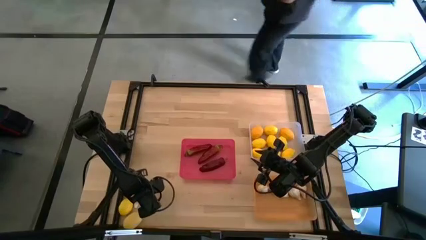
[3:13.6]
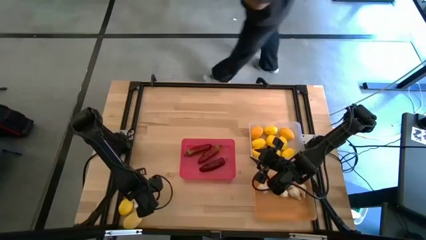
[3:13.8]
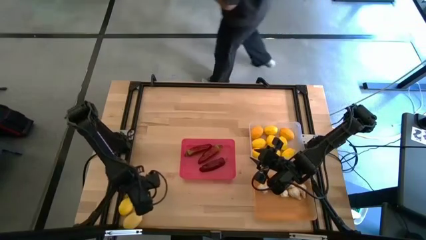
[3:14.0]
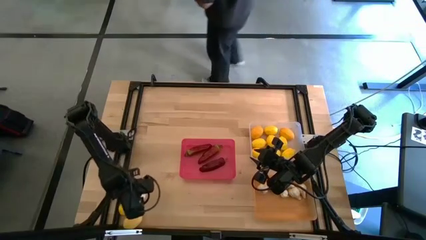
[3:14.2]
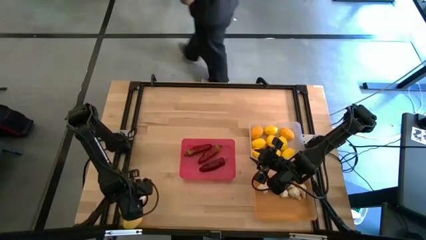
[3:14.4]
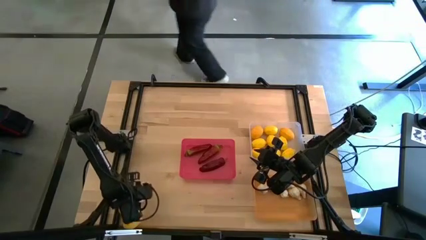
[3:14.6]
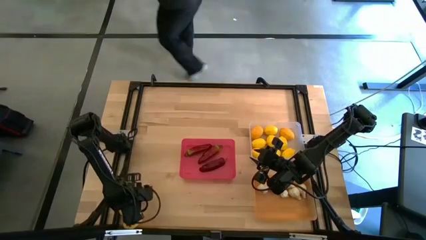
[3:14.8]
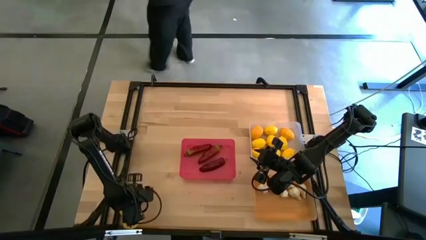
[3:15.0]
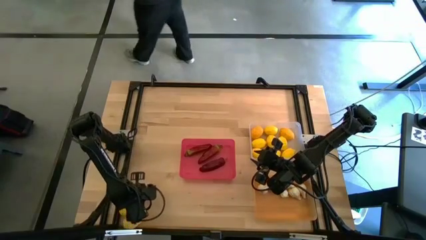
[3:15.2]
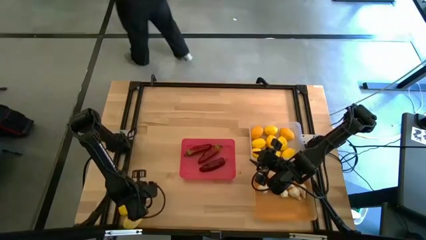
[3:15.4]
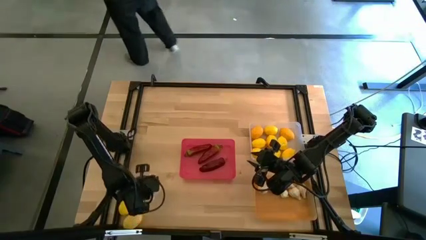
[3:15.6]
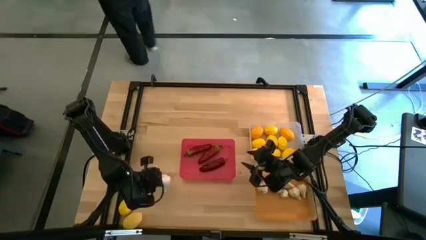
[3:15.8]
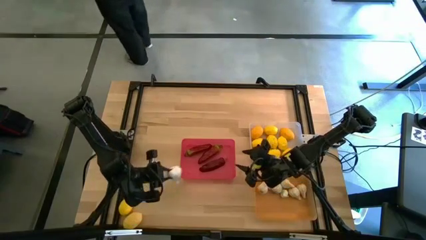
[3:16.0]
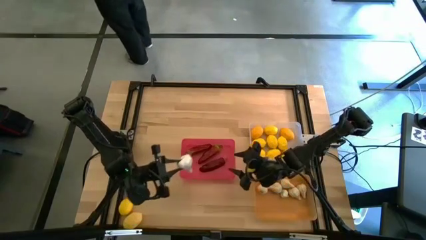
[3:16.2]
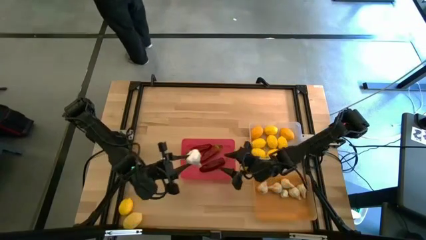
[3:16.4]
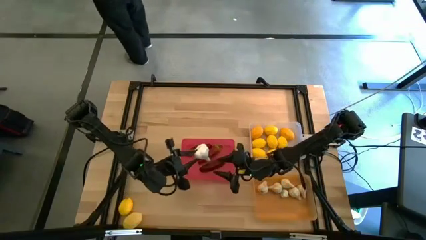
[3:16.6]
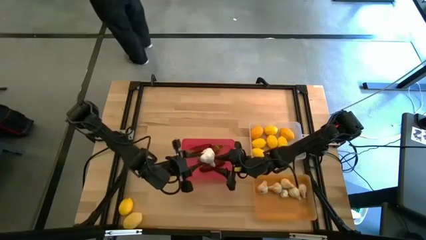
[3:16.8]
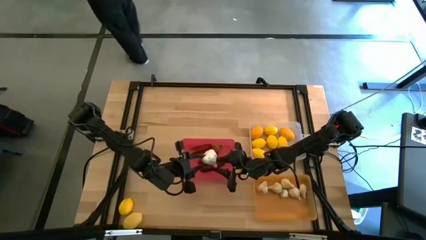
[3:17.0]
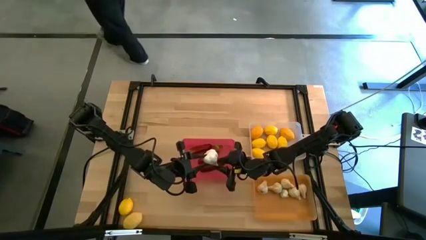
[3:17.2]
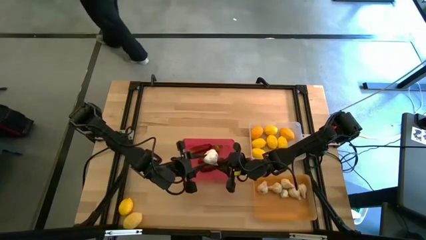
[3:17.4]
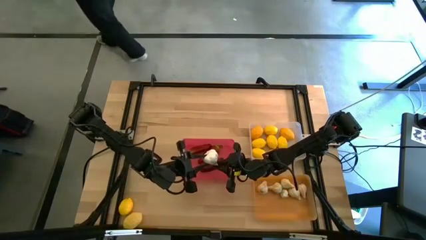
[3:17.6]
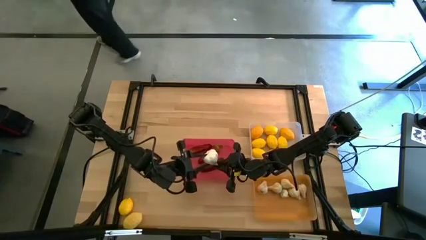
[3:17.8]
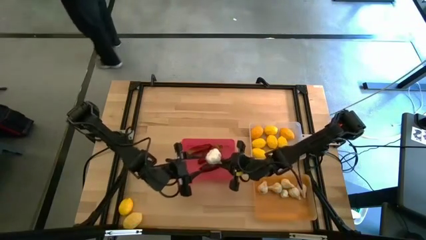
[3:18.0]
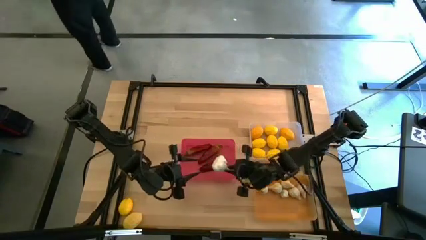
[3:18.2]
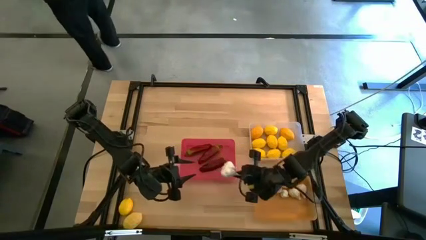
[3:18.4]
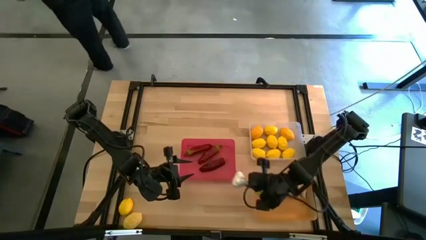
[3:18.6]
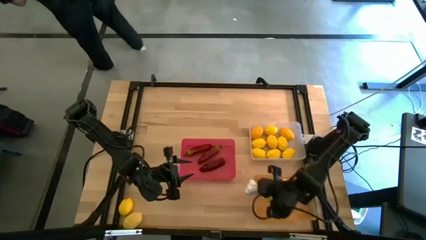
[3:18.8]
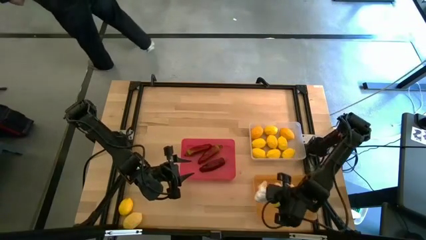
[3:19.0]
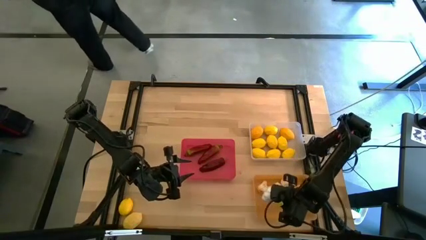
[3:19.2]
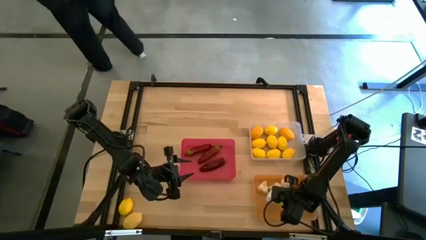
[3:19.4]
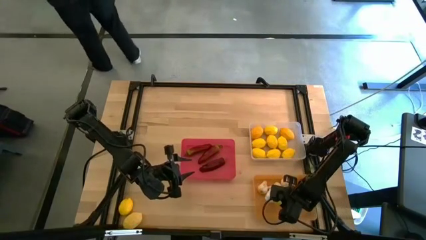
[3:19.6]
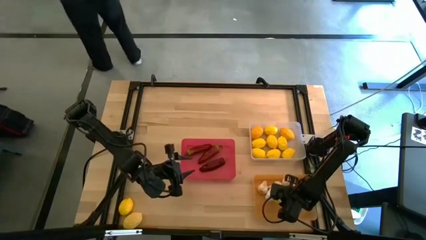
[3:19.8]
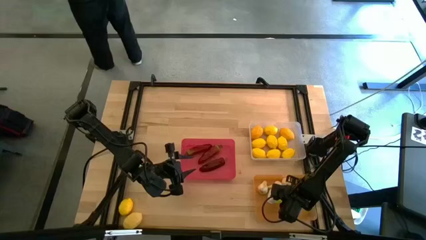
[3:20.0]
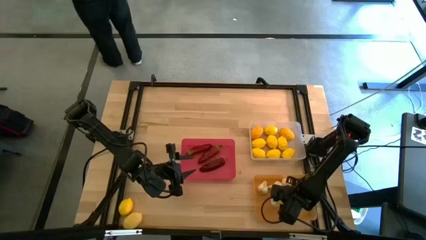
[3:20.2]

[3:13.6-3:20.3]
Task: Sort produce into baskets
Put the white garlic into the orange bin

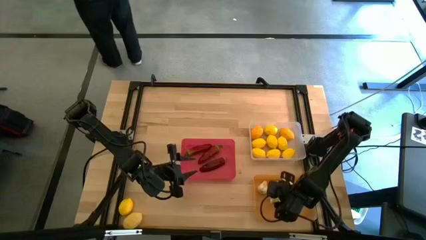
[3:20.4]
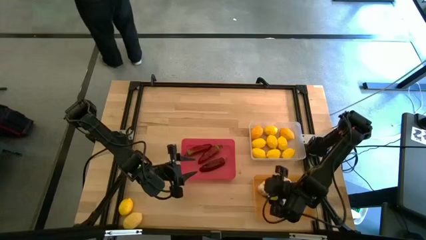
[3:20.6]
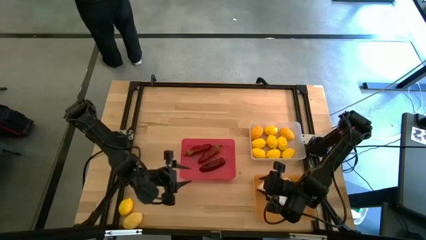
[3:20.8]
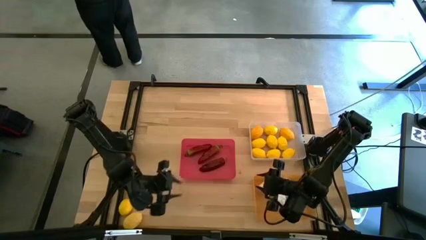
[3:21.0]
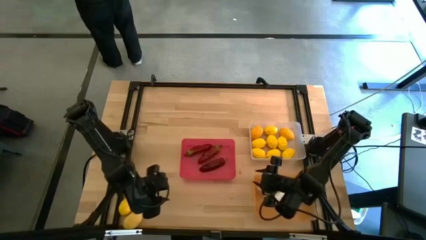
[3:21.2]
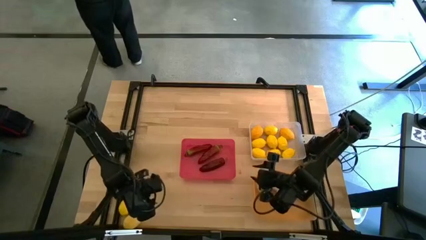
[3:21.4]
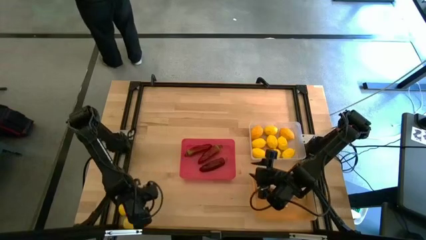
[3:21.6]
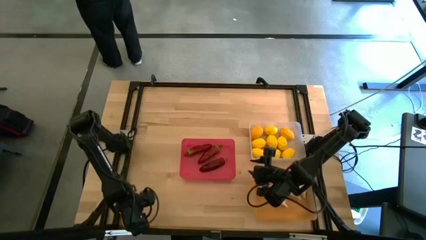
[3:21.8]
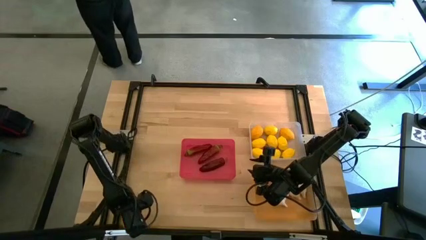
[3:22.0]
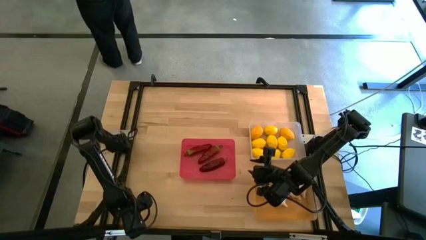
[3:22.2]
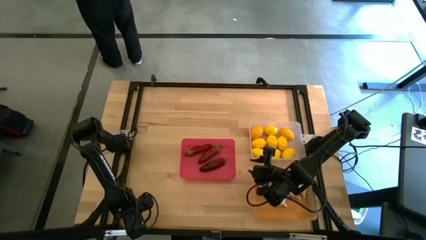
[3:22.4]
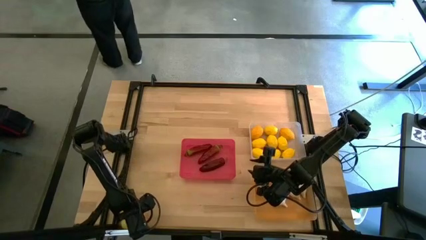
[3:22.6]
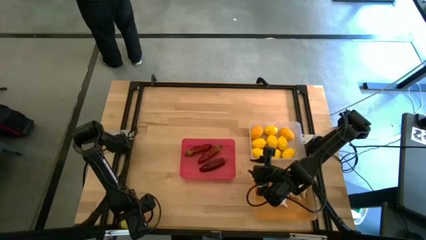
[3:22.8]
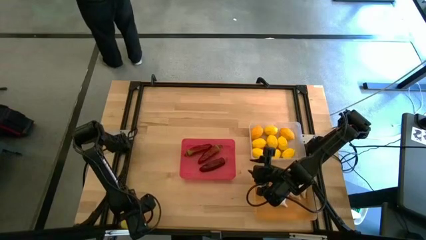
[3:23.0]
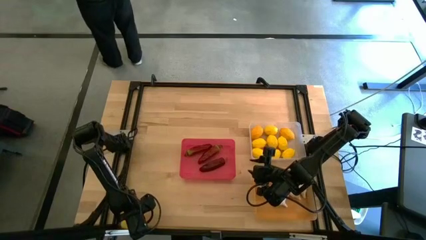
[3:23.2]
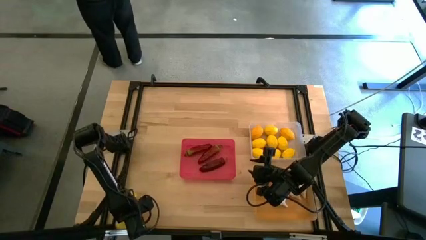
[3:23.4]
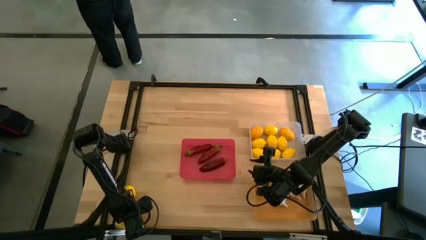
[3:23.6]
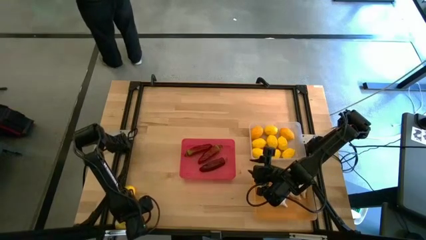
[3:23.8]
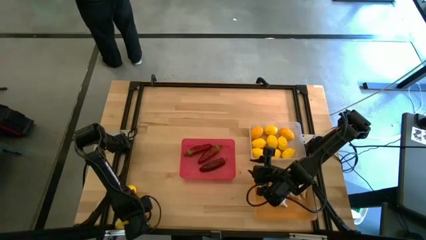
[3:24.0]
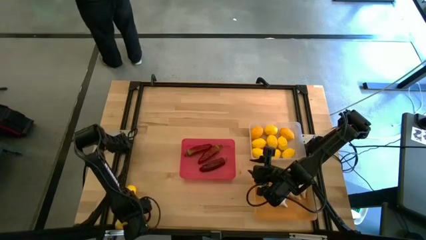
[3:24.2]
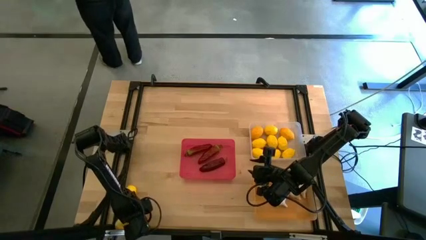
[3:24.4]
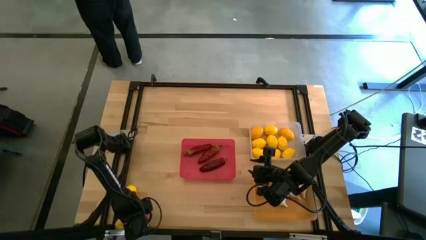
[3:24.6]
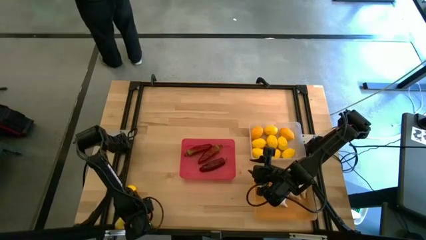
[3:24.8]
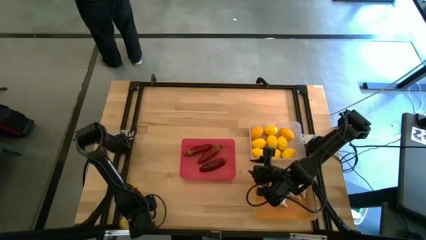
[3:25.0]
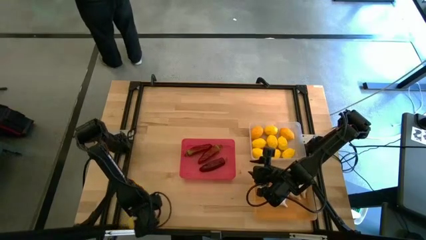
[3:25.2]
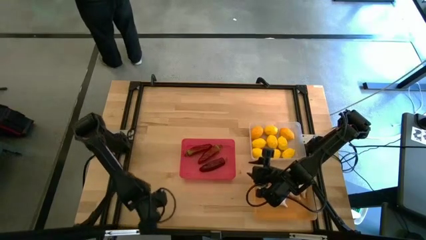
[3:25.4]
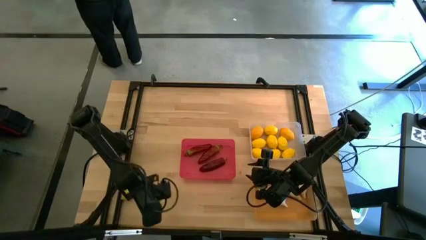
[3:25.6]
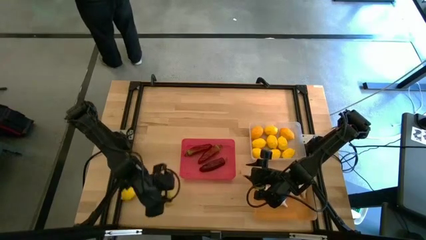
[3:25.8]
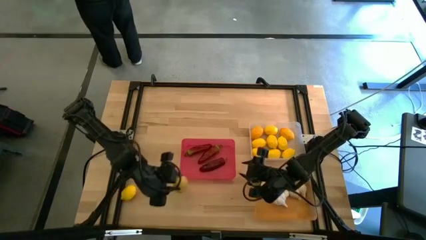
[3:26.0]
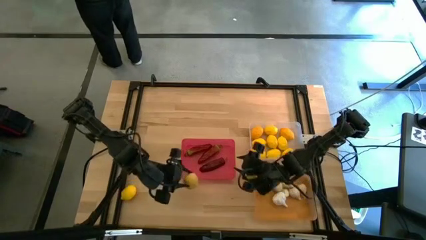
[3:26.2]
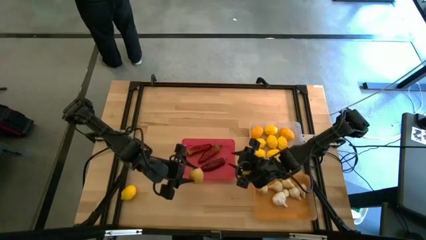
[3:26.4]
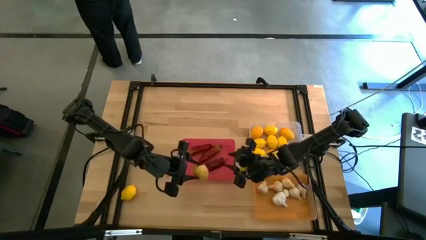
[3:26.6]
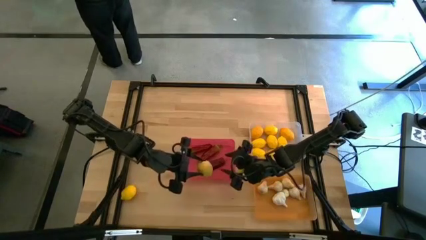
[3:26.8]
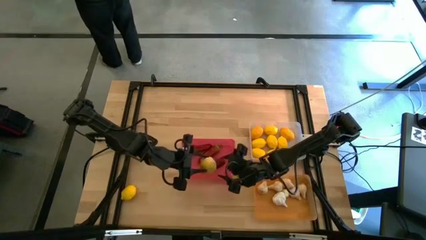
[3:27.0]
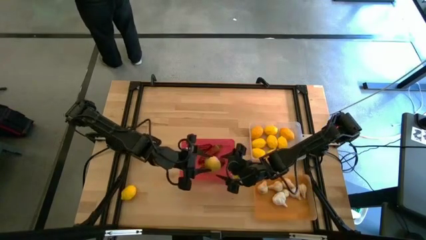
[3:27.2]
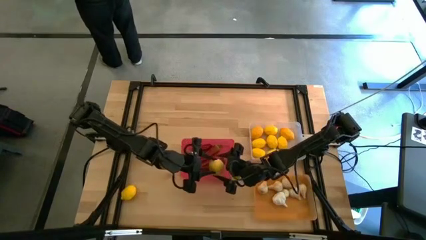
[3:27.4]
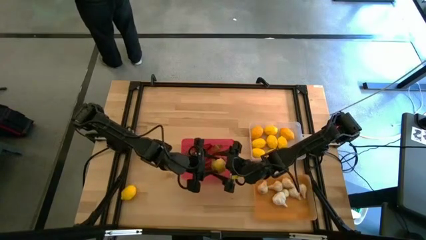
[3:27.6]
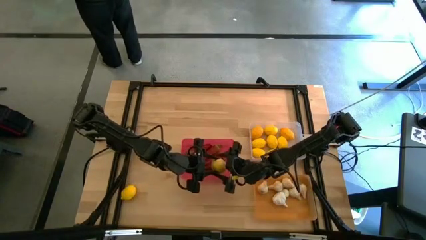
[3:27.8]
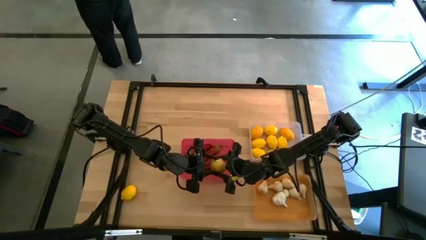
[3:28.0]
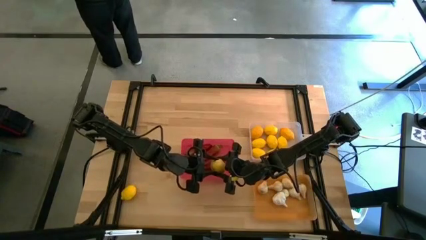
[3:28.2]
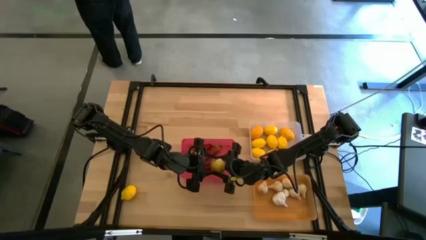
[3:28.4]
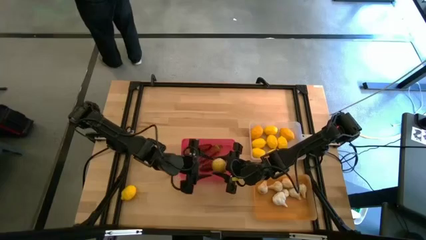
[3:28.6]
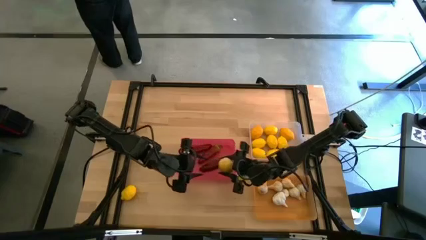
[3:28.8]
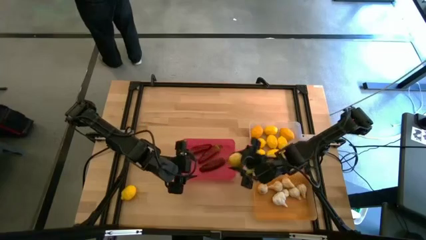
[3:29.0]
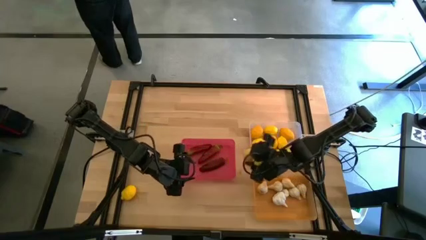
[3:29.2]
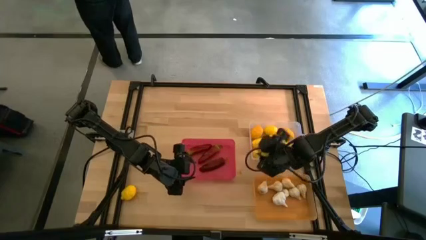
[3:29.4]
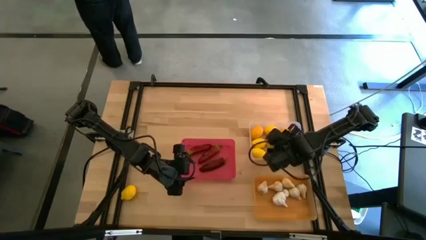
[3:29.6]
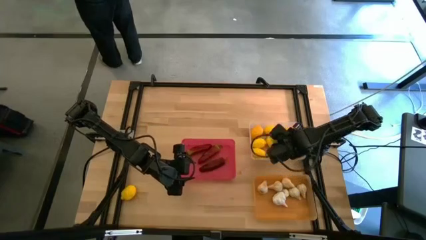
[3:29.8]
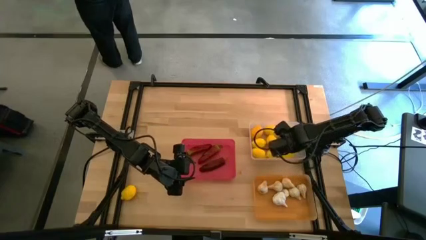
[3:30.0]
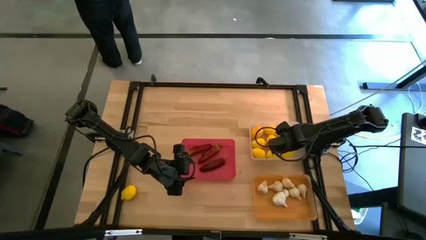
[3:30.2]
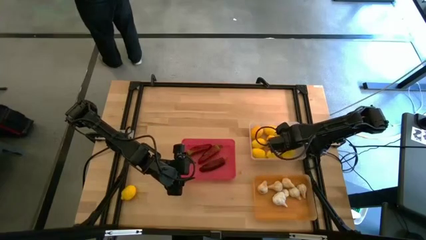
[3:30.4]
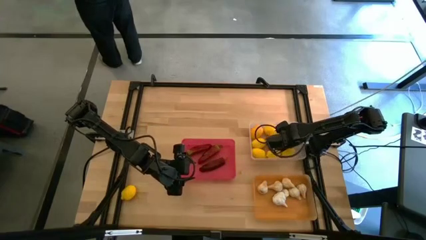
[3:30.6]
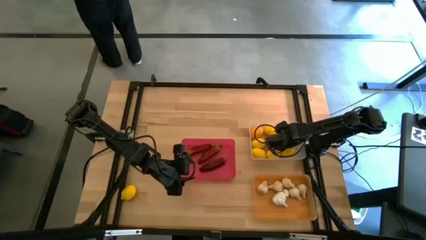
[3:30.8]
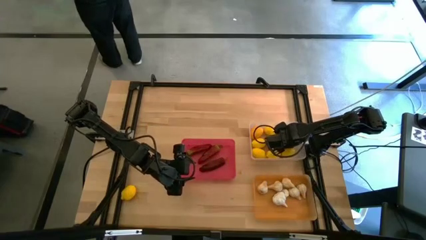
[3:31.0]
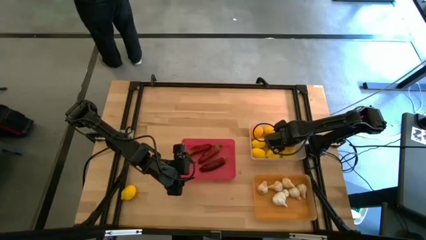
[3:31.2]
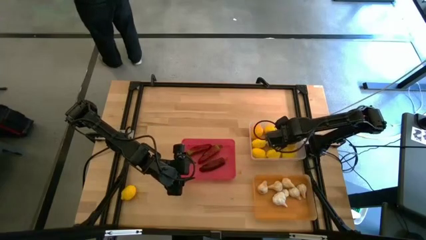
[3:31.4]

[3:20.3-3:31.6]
Put the yellow lemon into the transparent bin
